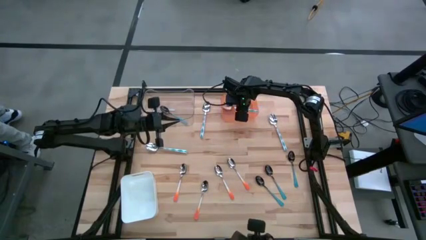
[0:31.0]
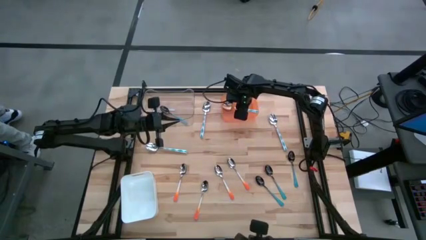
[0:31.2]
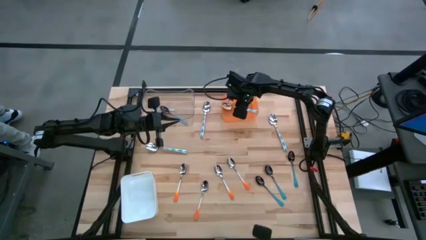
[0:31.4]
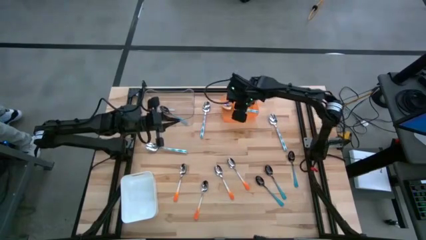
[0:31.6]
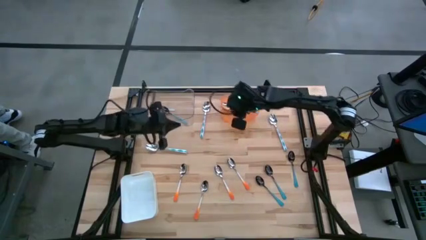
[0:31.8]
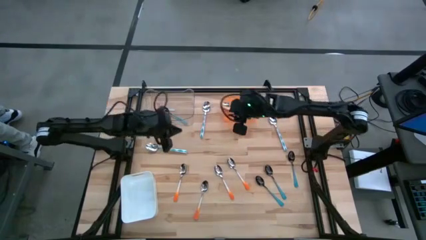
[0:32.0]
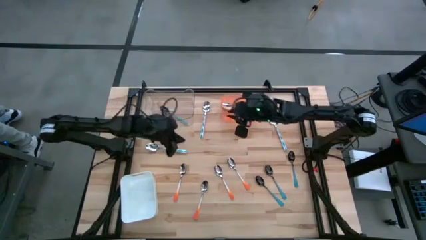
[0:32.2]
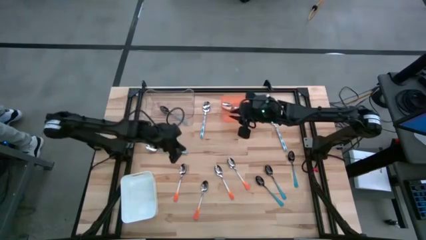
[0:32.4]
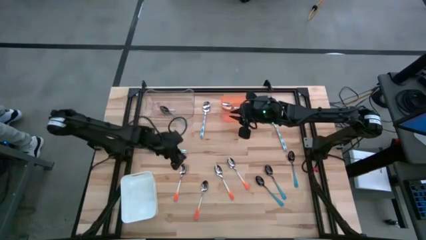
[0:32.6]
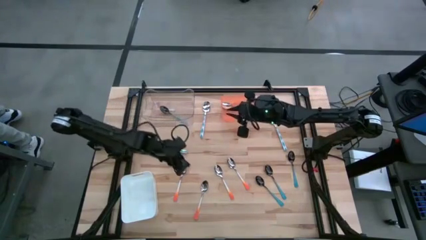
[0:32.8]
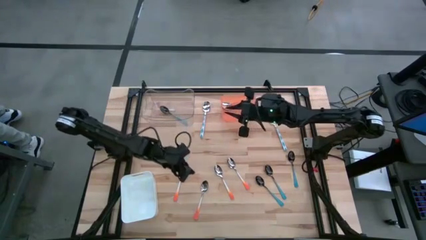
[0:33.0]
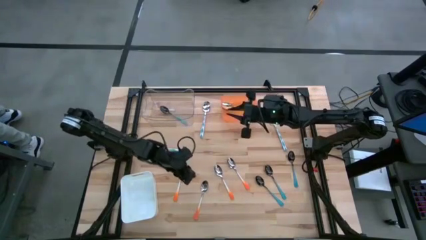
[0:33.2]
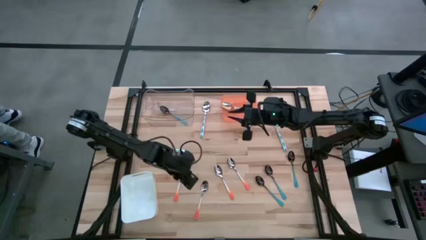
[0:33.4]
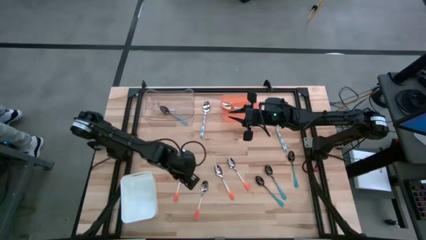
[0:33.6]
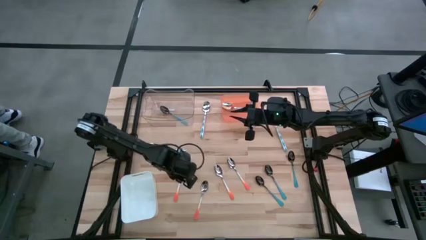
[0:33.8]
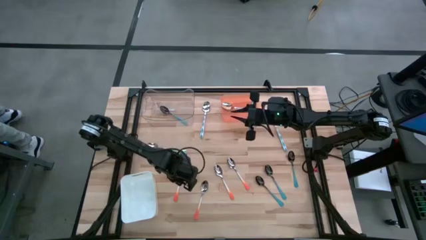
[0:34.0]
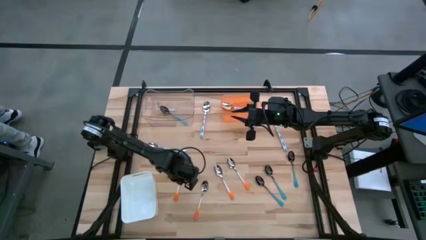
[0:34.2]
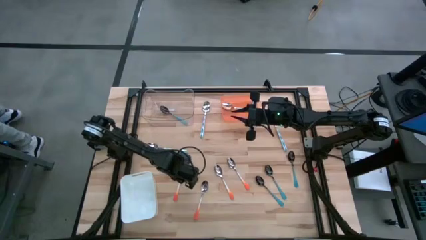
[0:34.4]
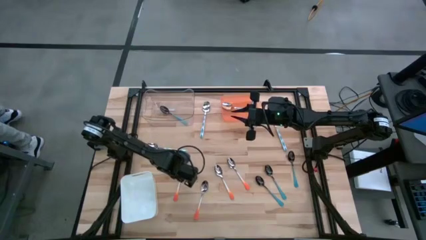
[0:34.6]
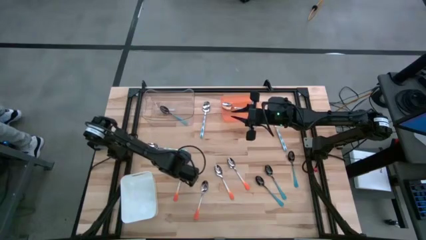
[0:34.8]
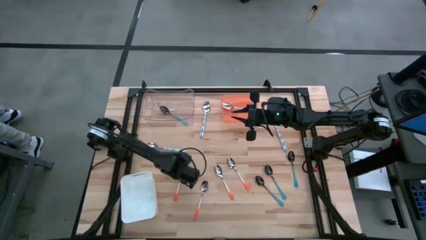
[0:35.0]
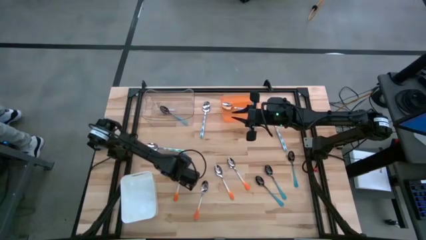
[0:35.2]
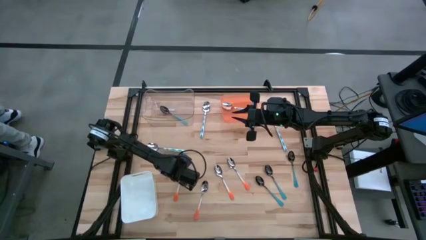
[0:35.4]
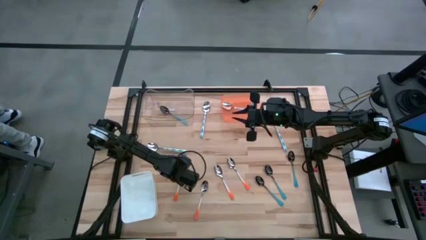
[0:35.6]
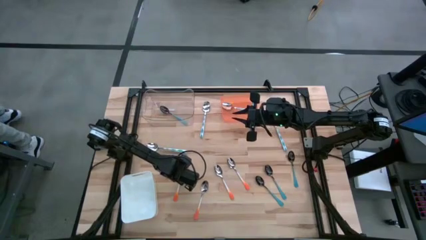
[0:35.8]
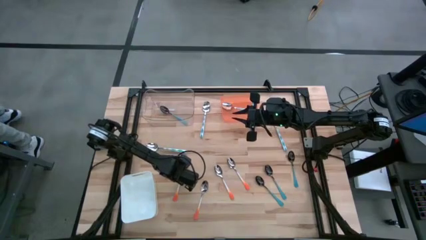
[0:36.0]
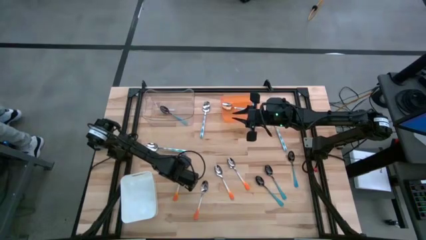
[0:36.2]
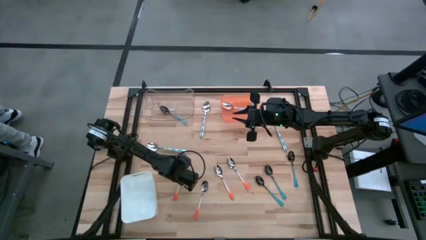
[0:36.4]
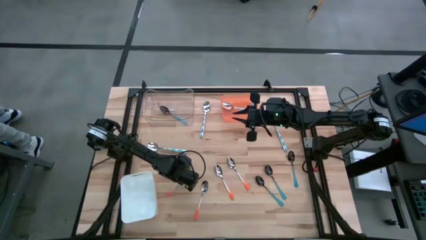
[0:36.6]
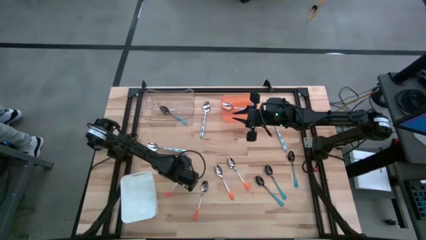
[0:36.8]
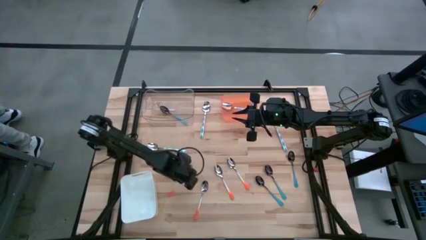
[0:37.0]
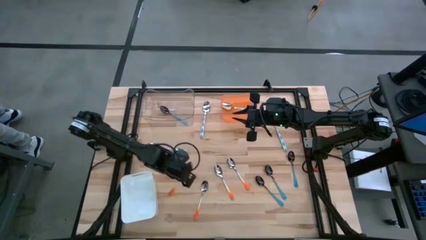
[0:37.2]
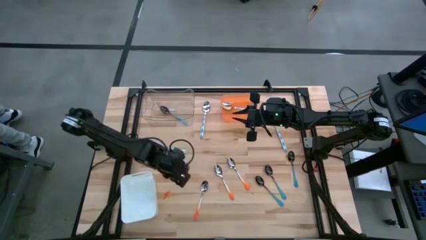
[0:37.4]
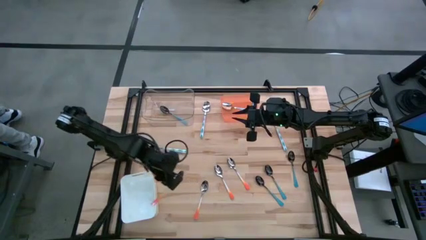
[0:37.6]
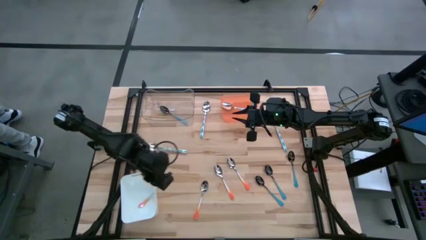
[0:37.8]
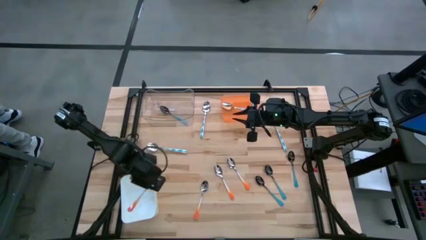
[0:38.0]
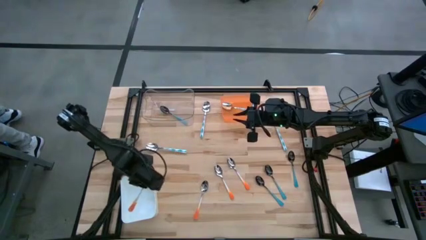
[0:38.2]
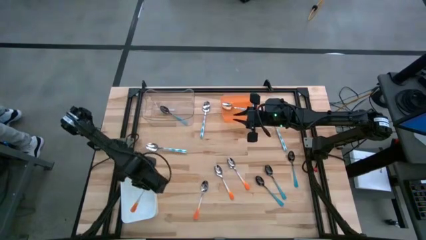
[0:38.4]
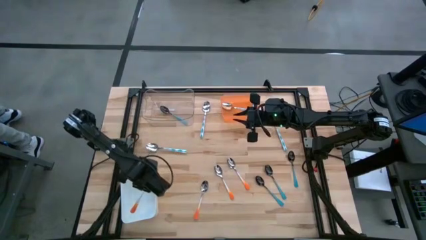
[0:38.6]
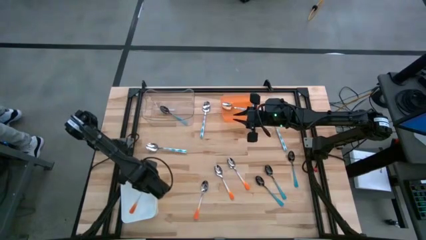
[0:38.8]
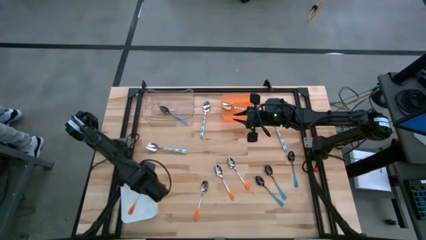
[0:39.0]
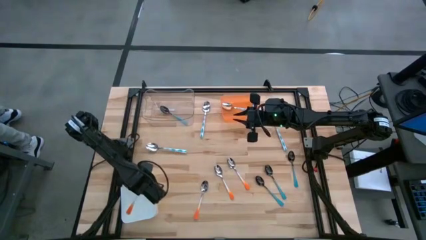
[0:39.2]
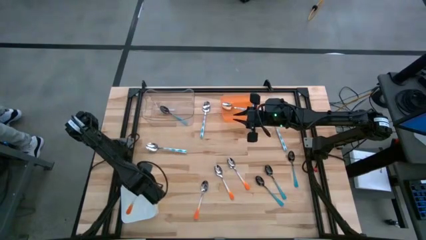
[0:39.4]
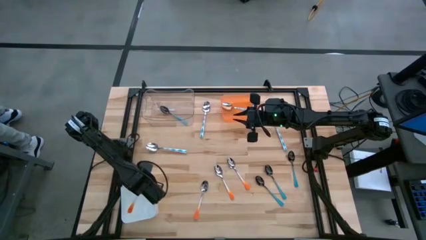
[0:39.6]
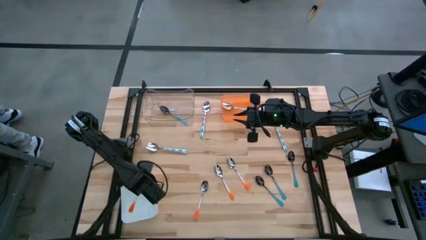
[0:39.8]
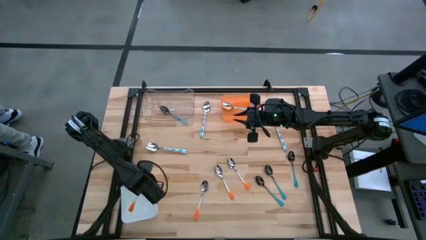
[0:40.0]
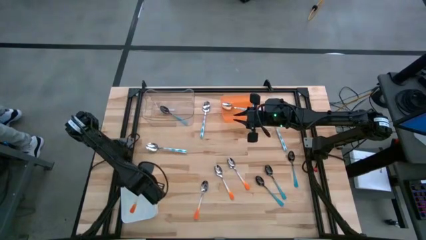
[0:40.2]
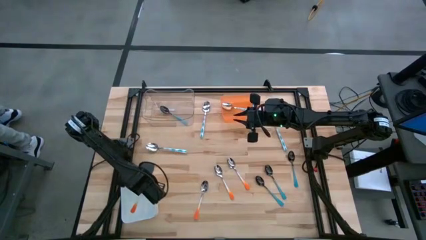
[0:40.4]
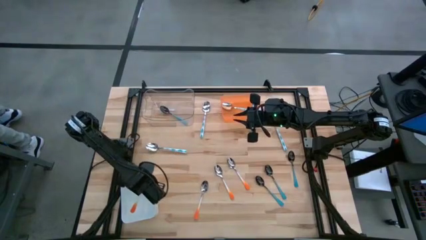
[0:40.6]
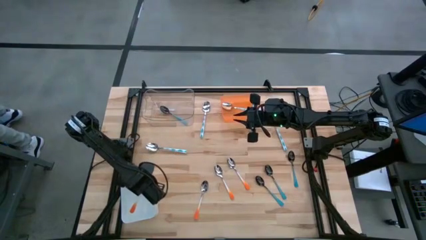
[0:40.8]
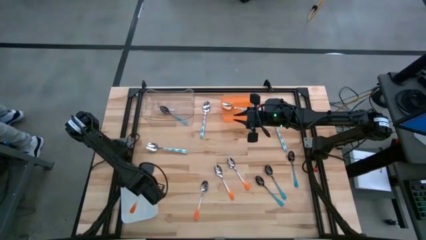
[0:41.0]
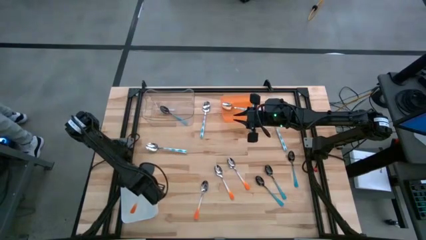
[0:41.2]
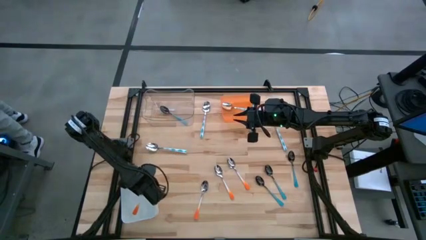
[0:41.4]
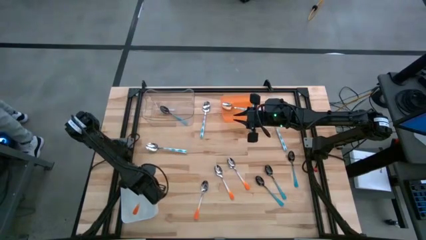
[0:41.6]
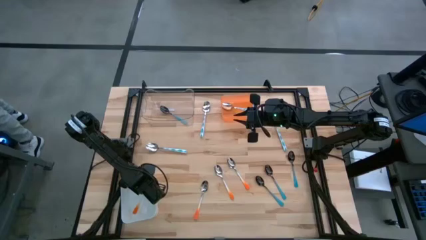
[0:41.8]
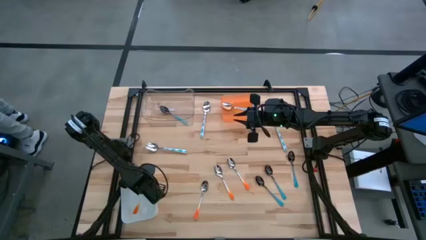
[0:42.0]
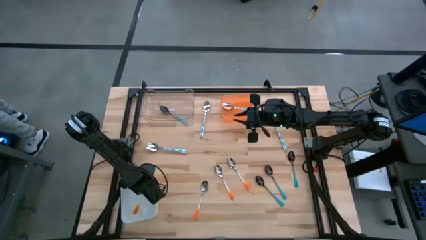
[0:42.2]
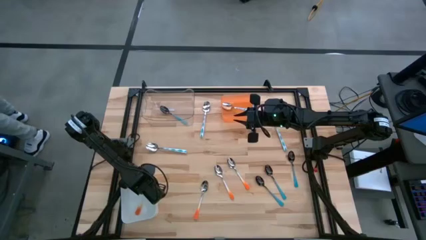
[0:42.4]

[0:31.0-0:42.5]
Task: Sort silverware by color (type)
Put the orange spoon into the white bin

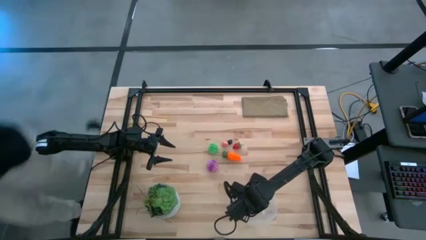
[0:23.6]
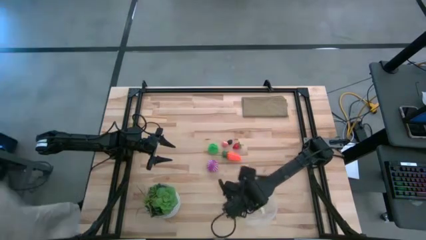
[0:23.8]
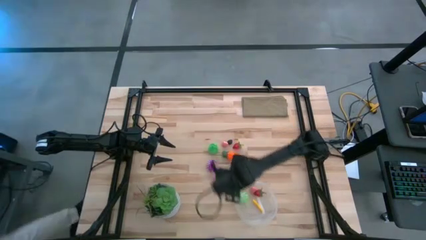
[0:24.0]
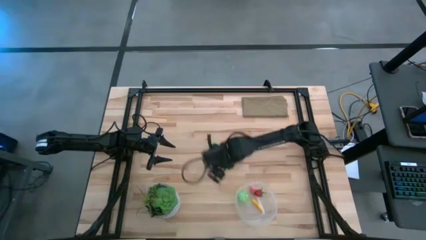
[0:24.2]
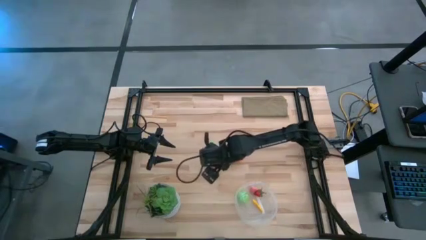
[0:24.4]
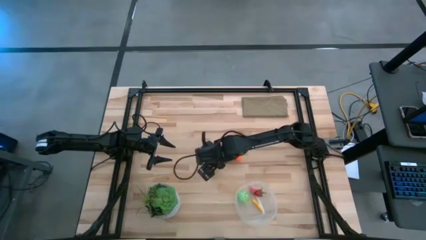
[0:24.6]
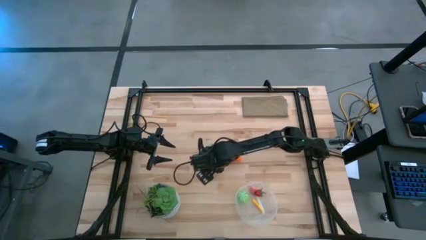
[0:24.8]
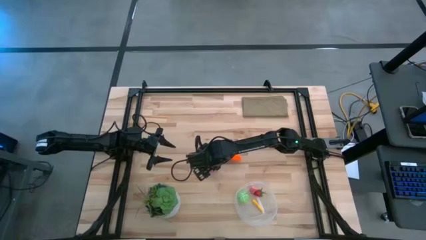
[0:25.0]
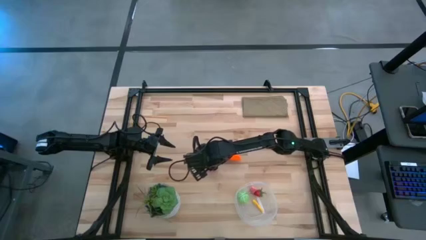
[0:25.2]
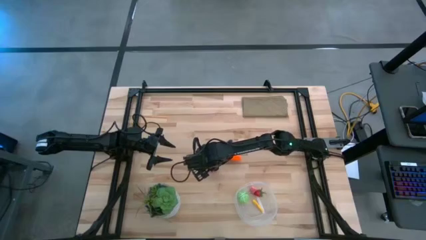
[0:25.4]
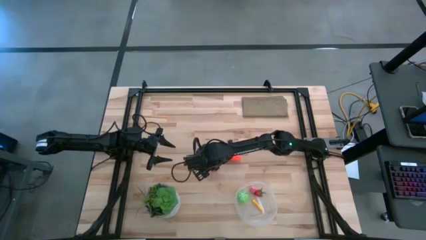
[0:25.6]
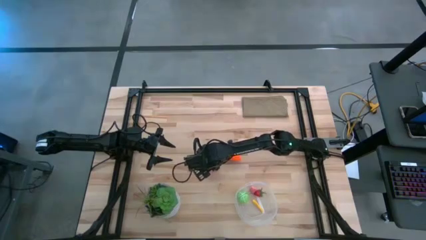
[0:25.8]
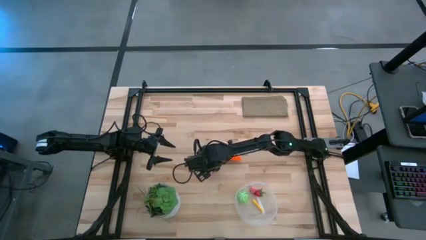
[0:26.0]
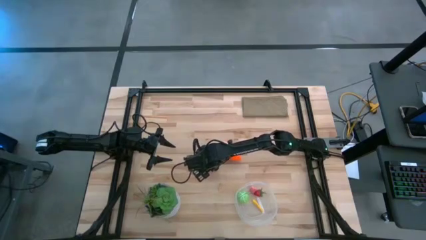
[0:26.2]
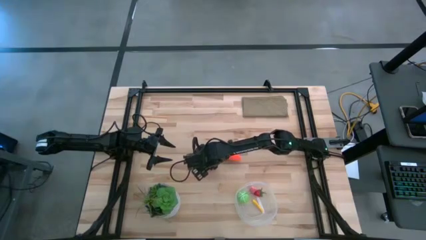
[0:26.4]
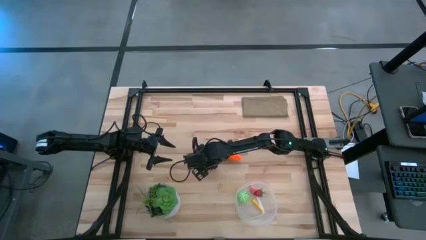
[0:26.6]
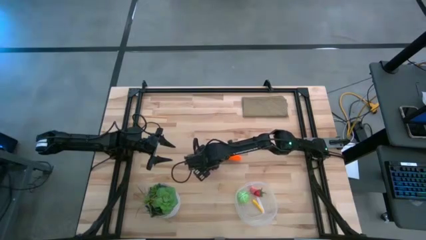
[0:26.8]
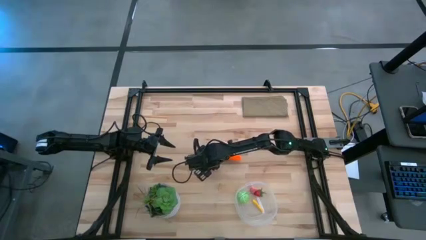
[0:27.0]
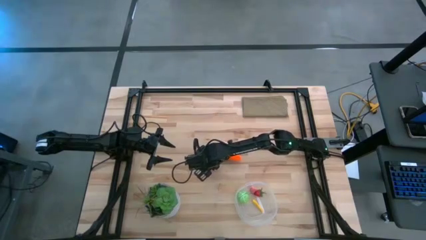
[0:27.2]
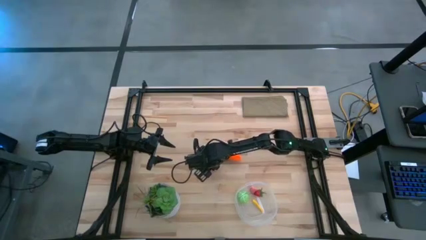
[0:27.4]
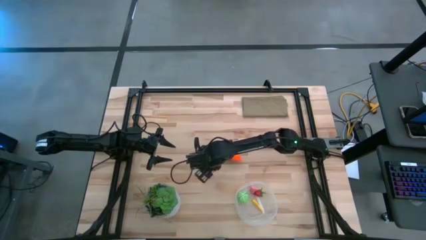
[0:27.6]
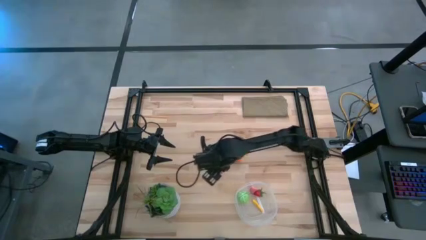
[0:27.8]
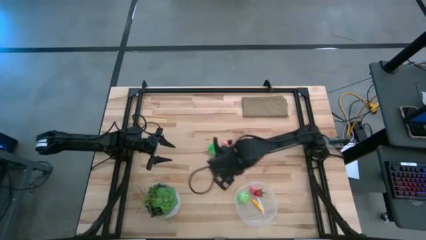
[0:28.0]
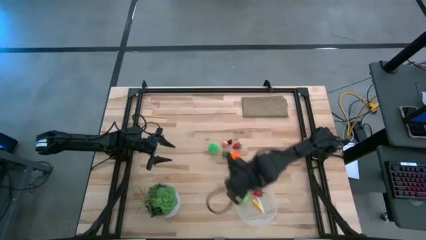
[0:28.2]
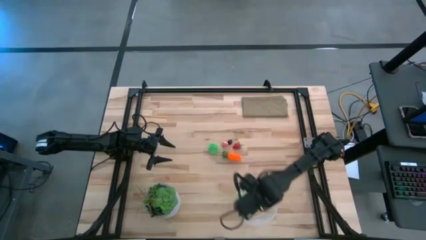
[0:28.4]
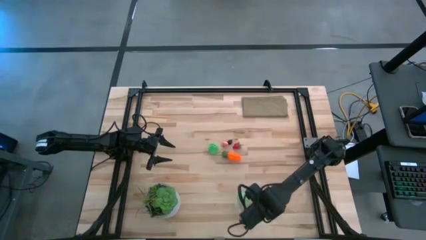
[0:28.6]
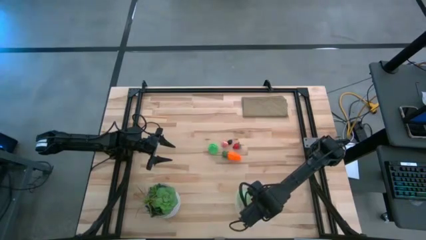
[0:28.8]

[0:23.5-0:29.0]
Task: Pick and placing Produce into tupperware
Put the purple onion into the transparent container
